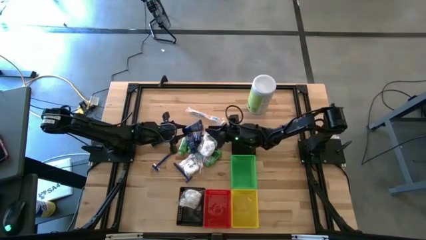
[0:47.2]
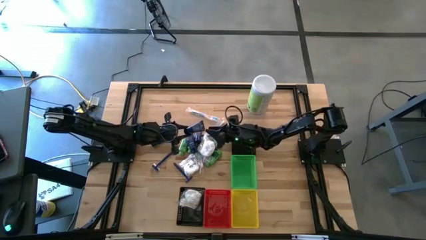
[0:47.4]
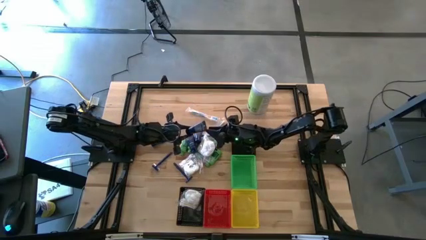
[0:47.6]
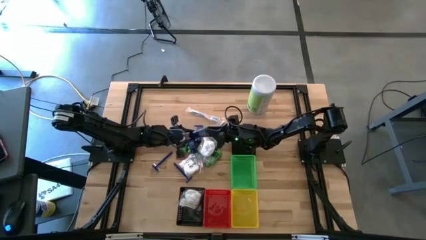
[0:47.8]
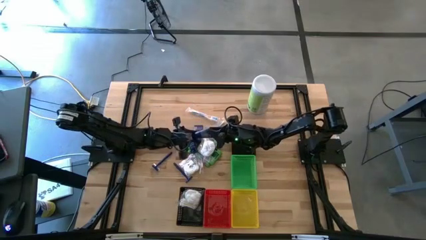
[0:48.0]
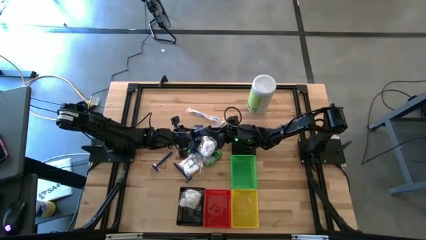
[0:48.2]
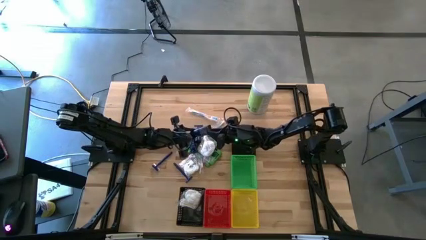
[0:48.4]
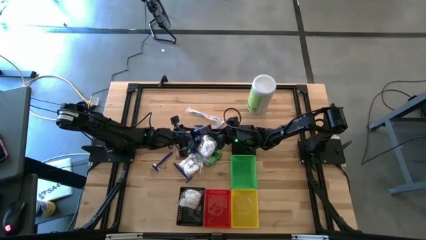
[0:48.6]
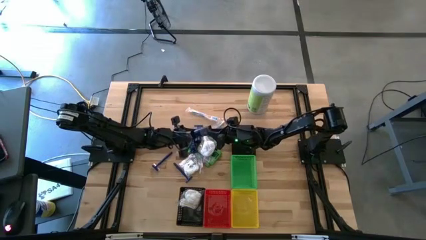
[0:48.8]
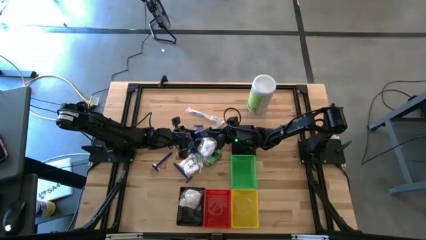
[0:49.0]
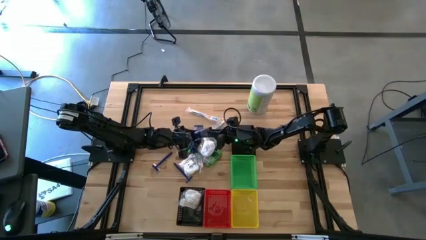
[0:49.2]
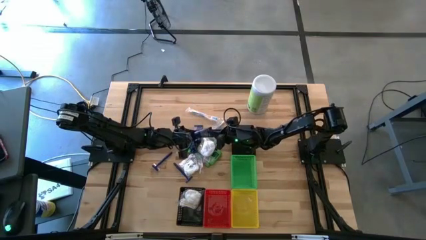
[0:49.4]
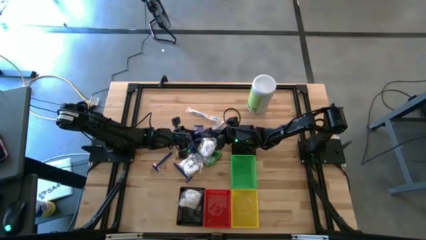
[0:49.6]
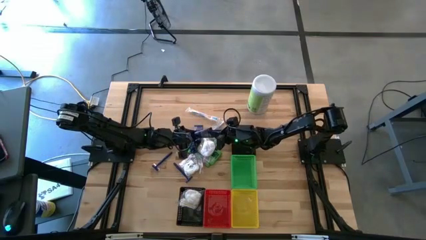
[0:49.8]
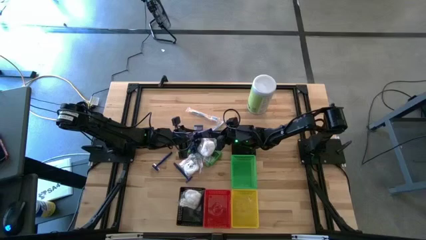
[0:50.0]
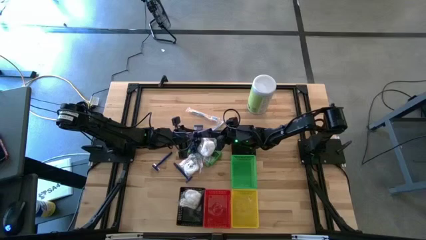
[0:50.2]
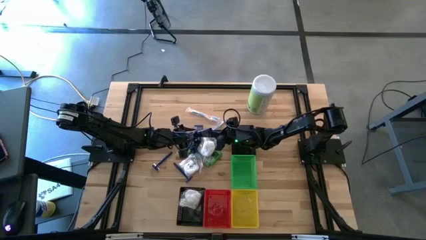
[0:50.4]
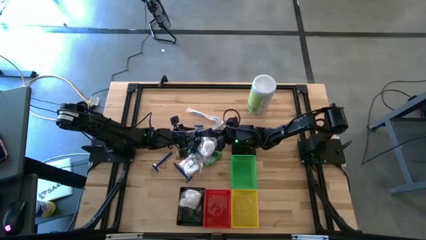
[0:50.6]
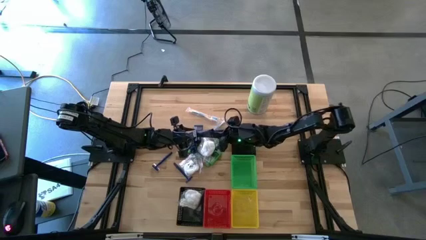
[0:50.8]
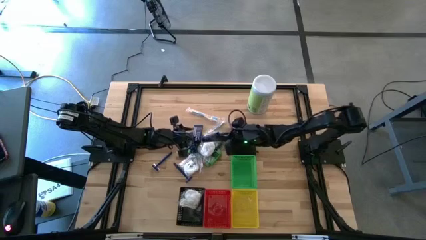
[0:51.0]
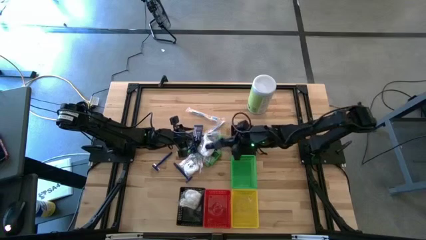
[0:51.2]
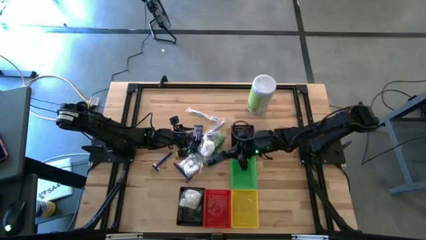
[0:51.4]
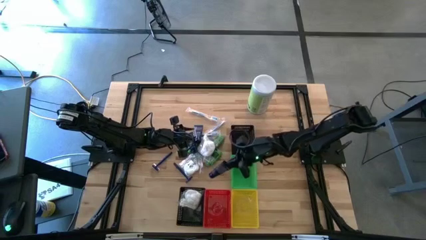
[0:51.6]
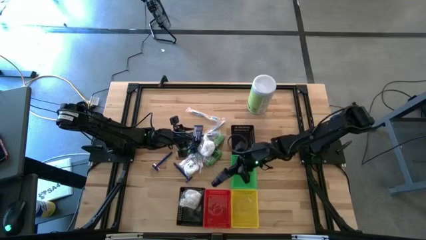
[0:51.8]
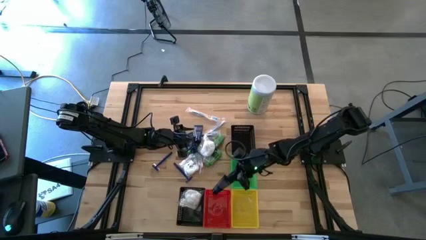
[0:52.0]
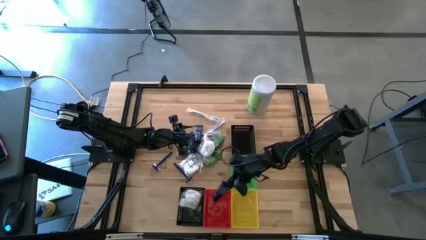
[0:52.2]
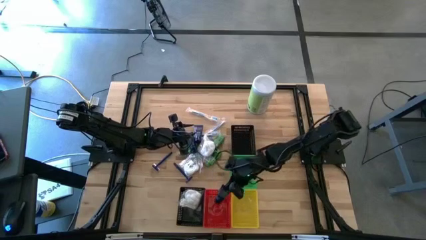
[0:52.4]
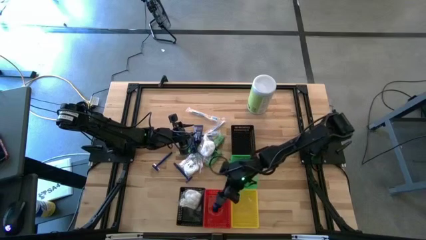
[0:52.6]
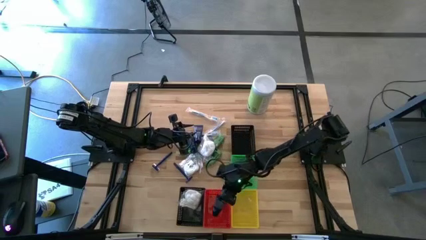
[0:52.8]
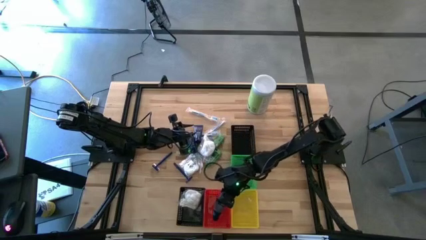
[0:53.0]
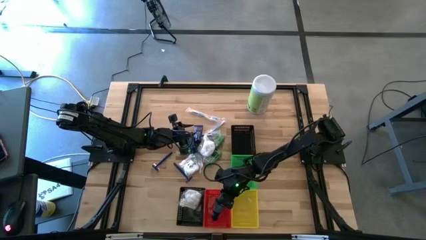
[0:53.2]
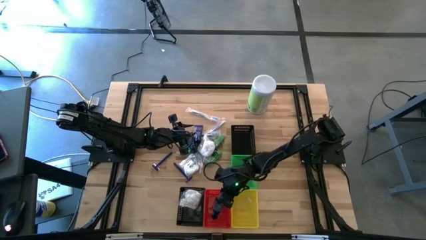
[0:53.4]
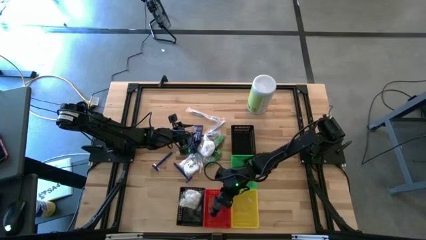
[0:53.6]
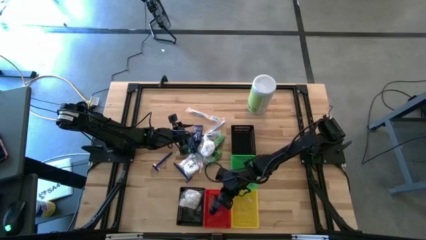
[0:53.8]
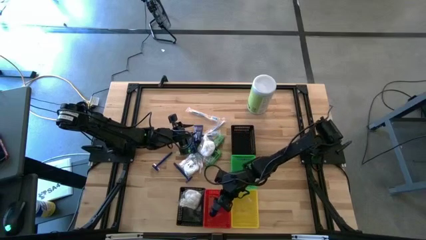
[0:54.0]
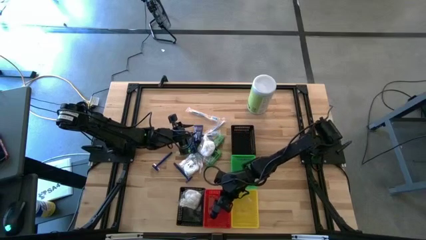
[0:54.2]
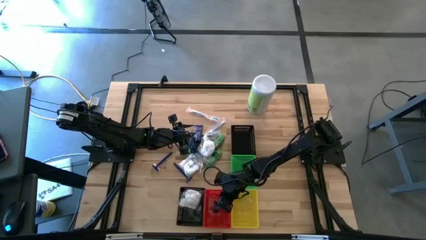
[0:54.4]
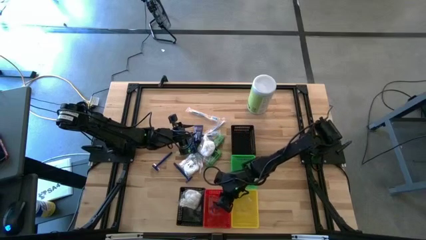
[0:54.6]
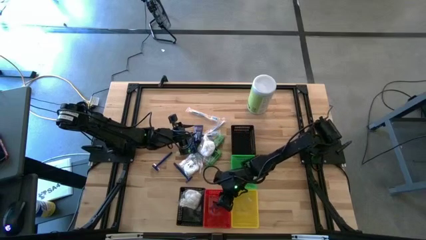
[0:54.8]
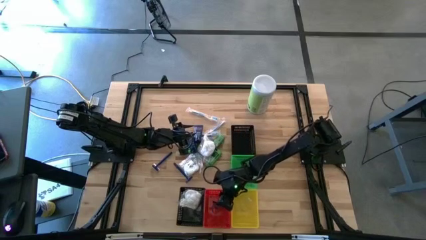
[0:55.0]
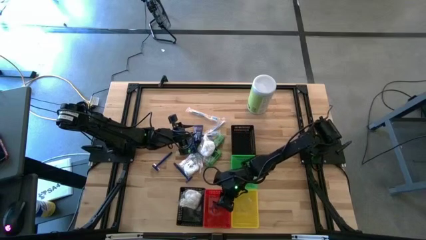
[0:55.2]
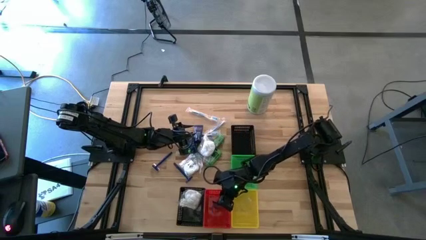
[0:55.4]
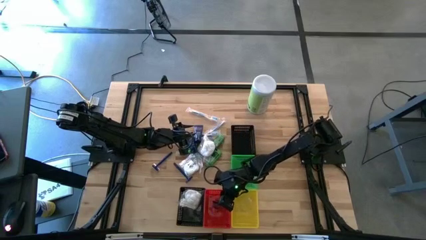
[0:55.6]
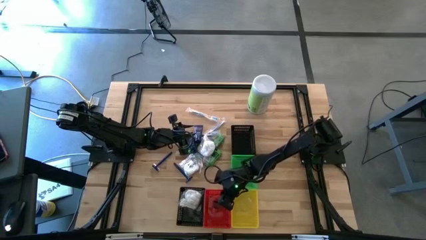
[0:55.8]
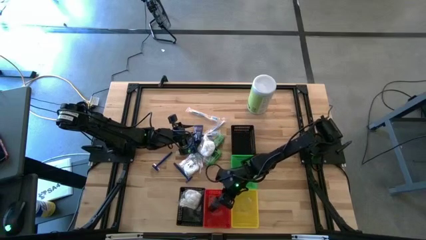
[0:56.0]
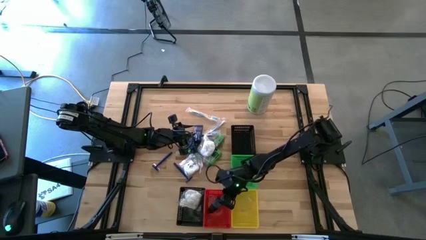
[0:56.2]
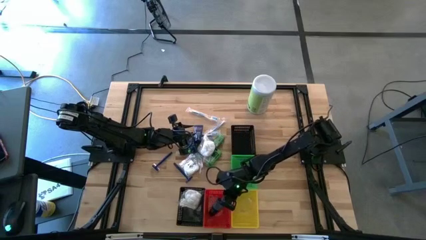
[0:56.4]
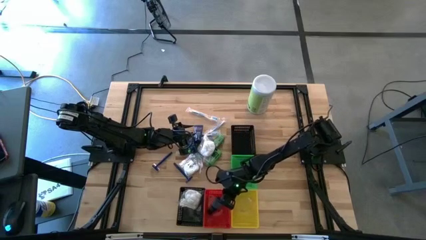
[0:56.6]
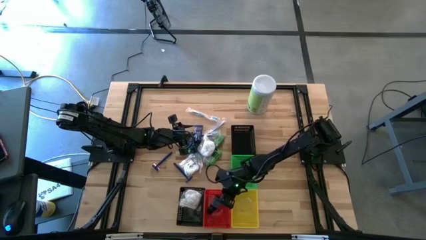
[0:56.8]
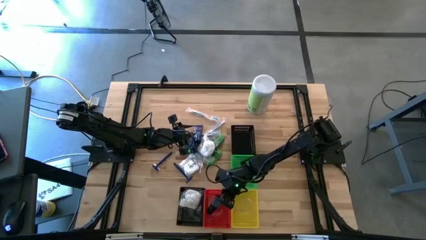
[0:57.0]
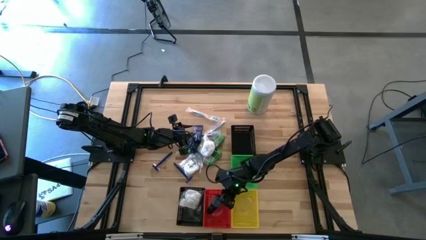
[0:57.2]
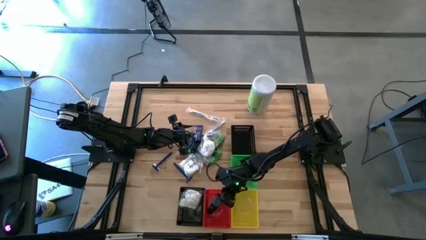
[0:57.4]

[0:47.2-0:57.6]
Task: Pick & Place Travel size toiletries
Put the blue shave cream into the red bin

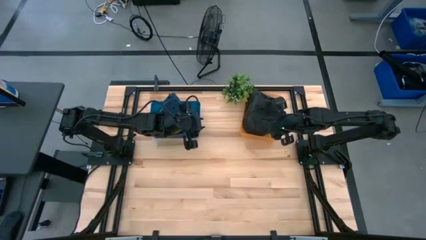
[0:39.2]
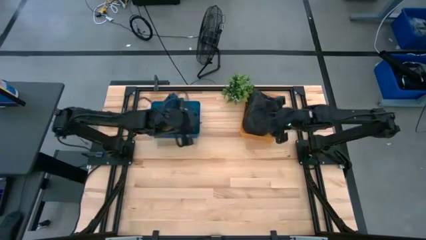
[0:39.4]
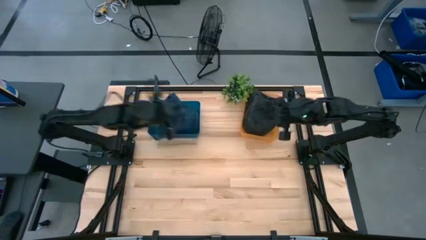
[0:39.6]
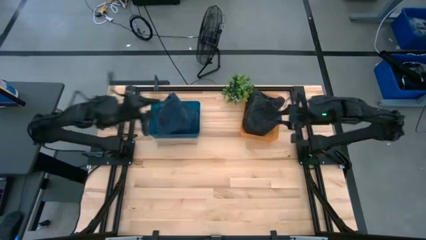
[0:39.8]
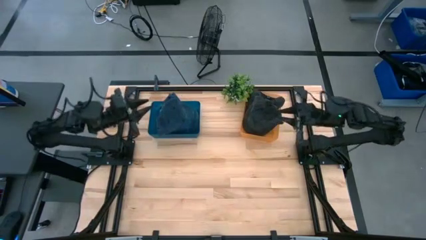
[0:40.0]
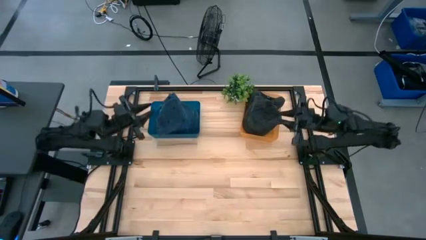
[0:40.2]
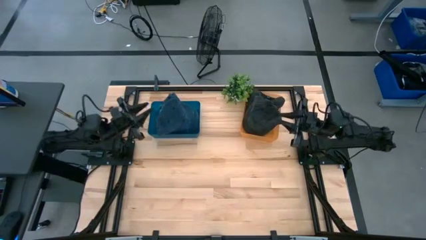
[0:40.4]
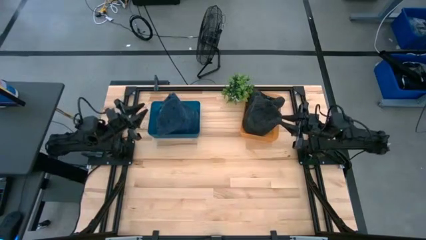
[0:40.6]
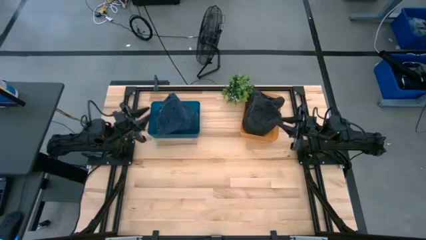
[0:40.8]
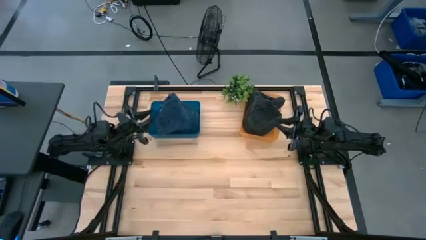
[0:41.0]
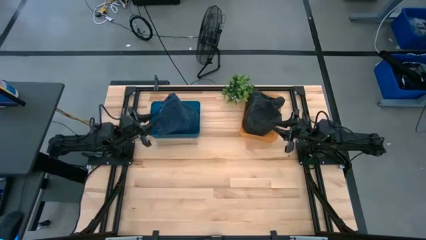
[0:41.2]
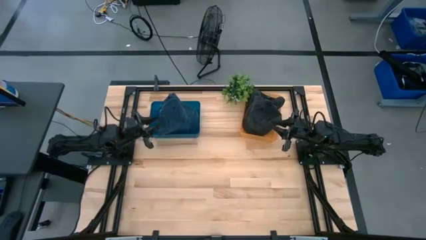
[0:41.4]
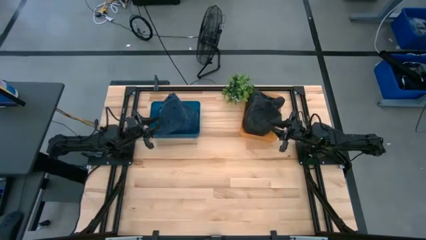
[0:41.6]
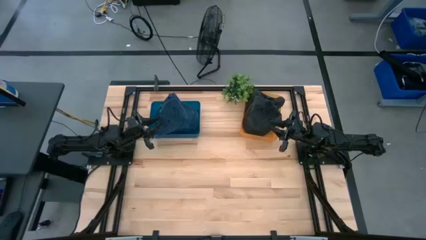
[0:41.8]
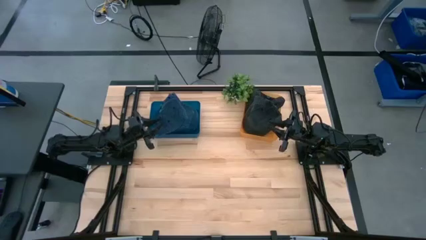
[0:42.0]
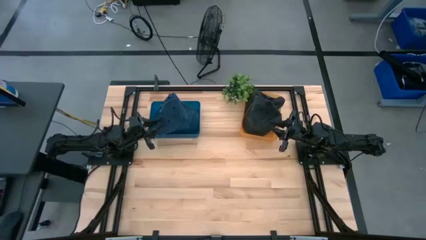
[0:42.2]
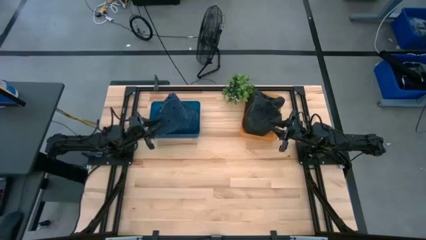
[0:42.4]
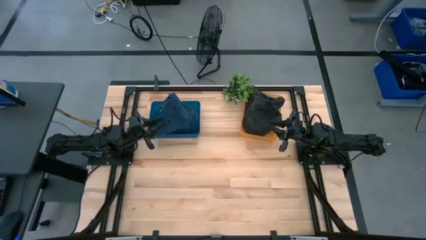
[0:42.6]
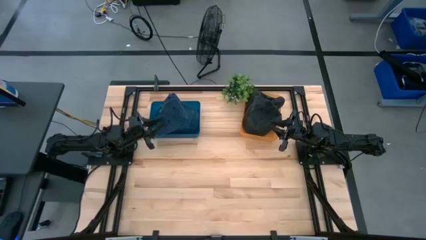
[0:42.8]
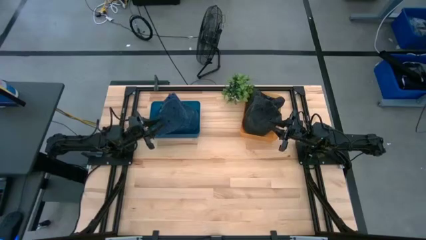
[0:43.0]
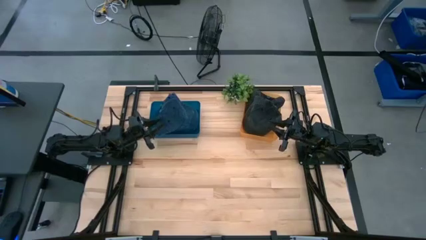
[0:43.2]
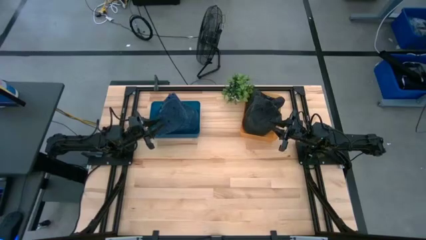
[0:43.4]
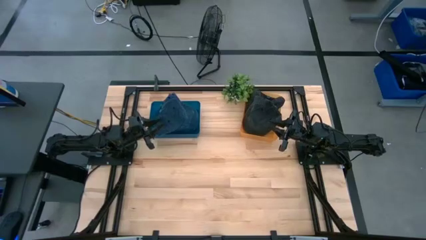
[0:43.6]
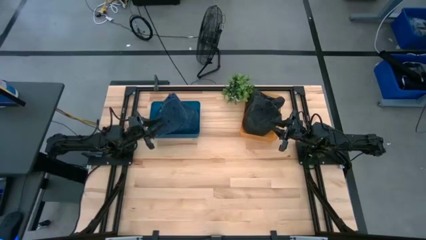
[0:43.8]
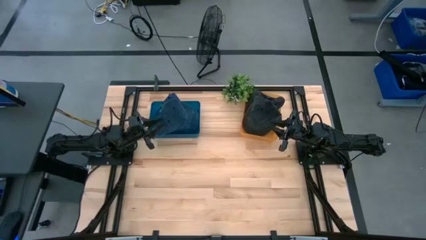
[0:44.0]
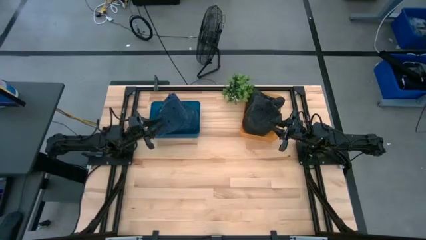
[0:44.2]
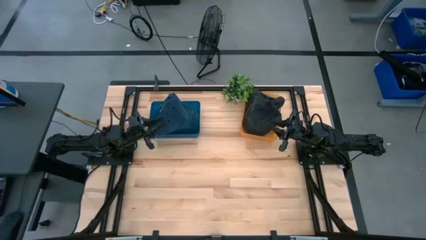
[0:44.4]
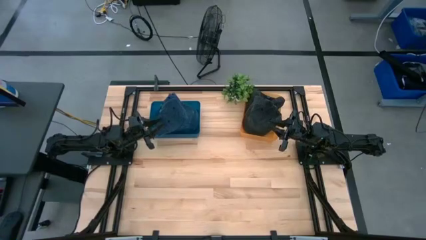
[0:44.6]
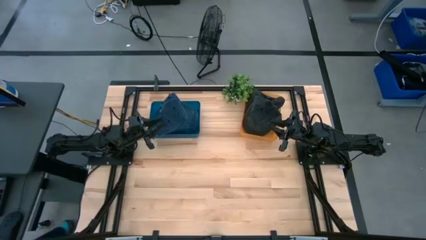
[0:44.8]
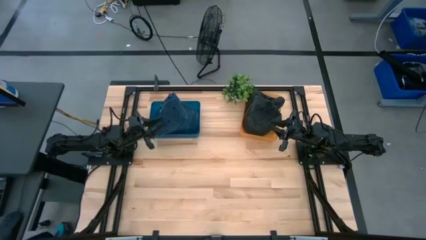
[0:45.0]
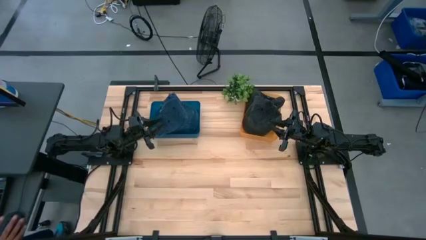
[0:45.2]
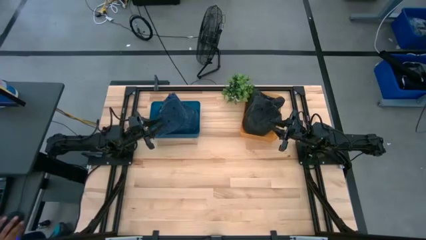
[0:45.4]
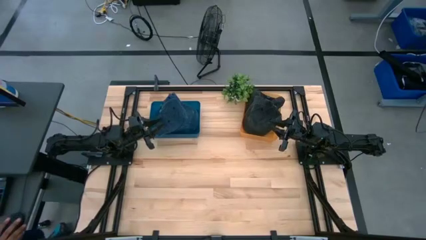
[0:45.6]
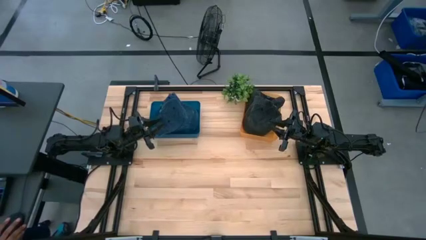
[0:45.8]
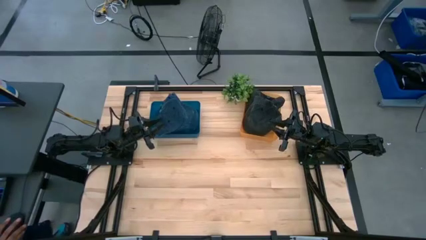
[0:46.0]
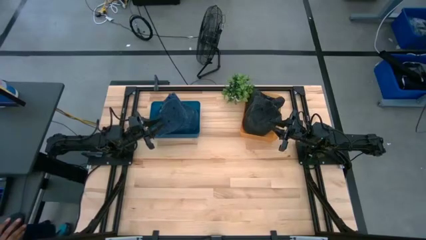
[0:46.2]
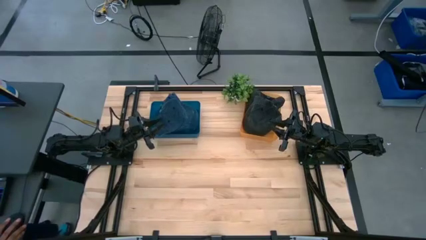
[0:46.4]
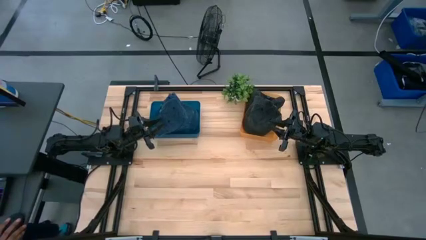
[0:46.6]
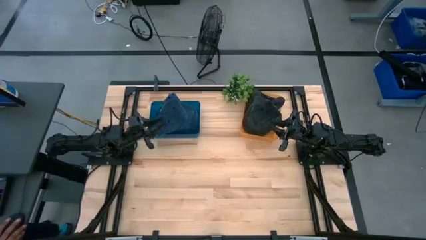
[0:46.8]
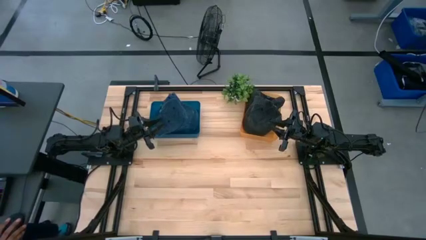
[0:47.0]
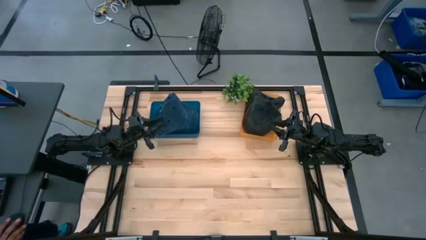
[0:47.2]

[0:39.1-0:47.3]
Task: Pick & Place hat
Return to Home Position
